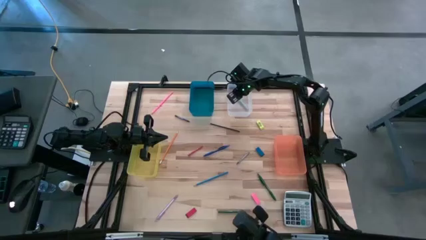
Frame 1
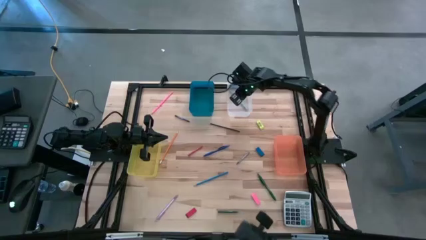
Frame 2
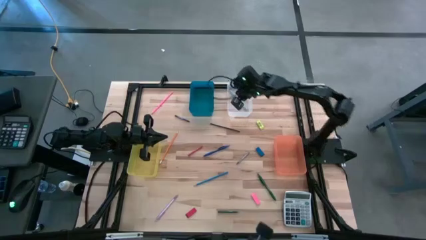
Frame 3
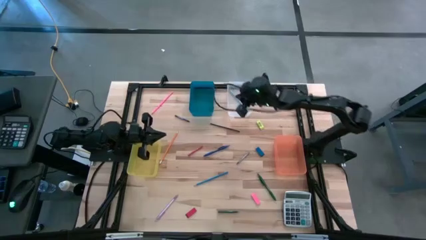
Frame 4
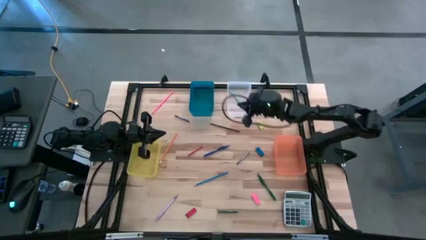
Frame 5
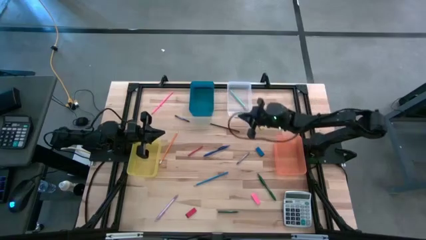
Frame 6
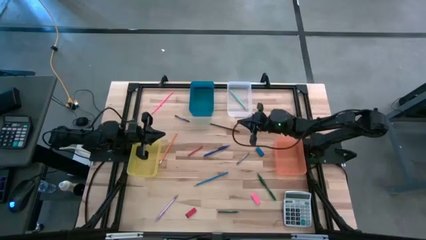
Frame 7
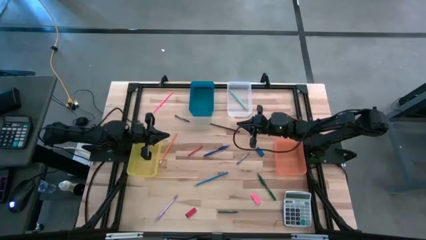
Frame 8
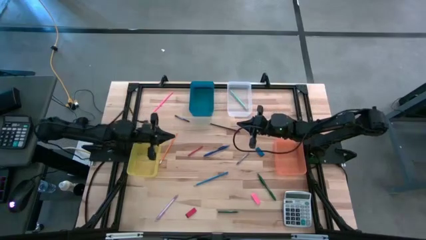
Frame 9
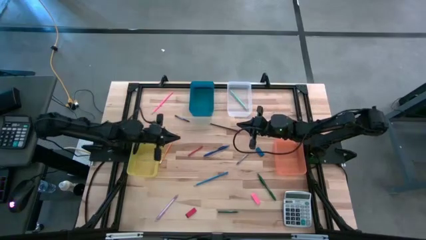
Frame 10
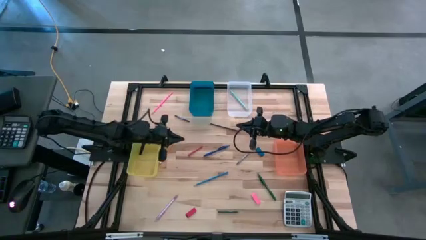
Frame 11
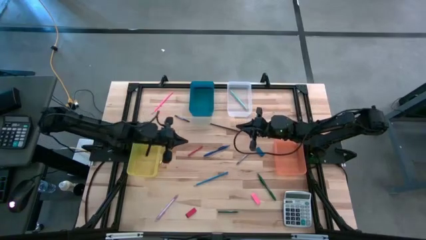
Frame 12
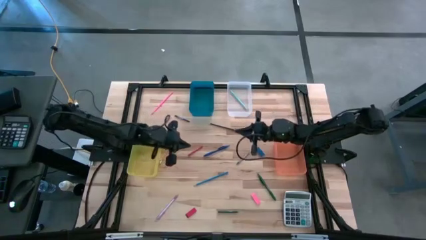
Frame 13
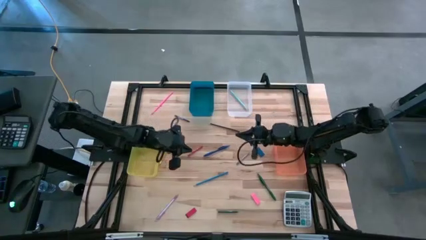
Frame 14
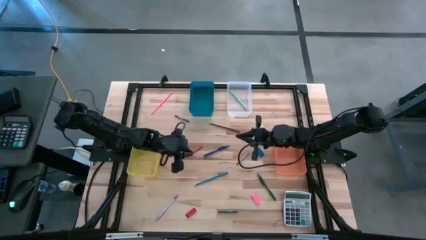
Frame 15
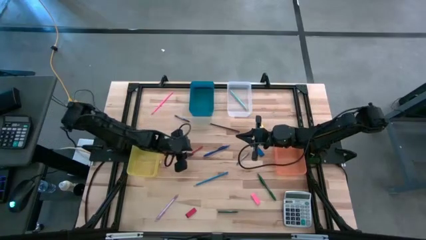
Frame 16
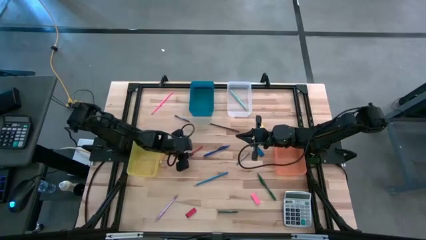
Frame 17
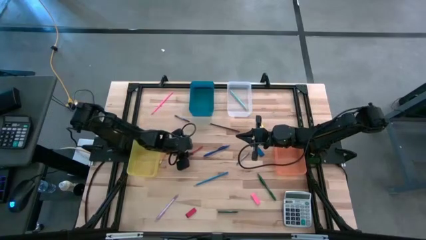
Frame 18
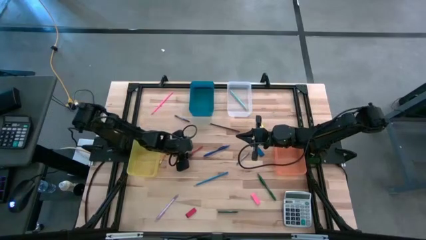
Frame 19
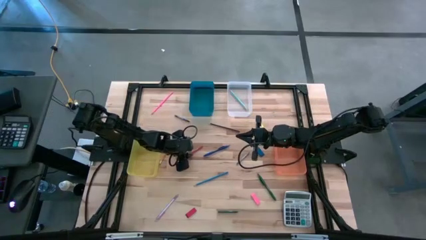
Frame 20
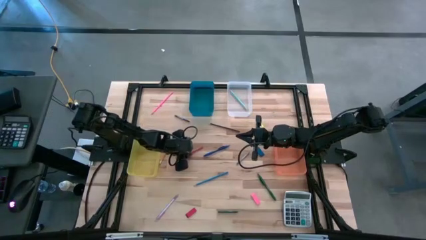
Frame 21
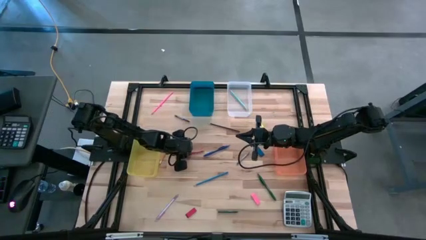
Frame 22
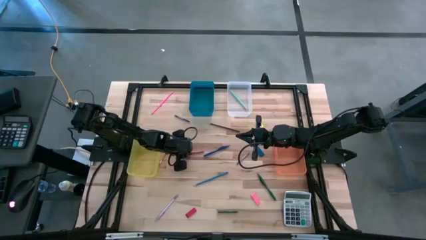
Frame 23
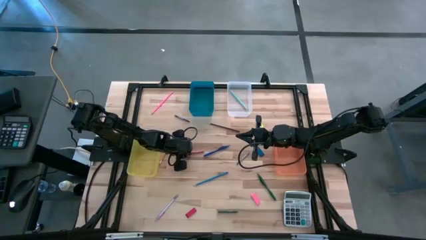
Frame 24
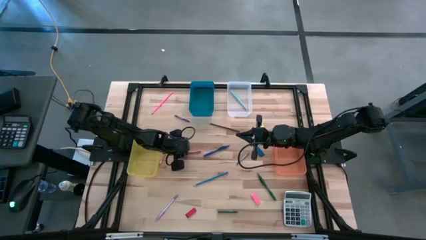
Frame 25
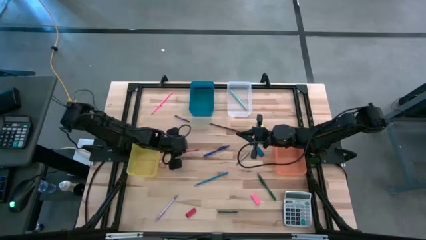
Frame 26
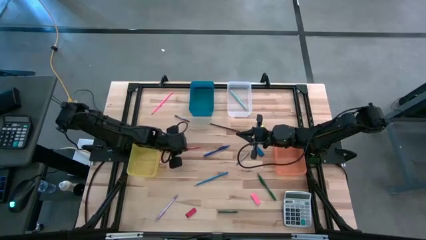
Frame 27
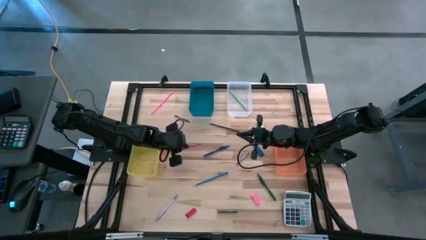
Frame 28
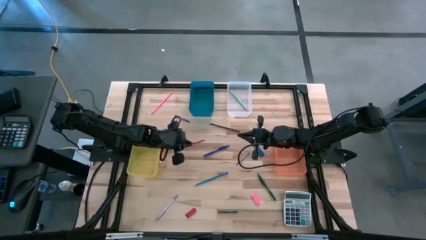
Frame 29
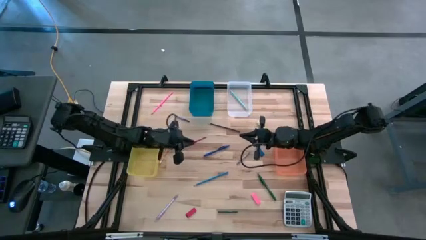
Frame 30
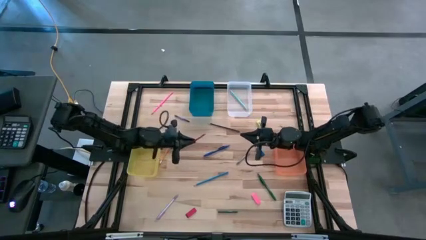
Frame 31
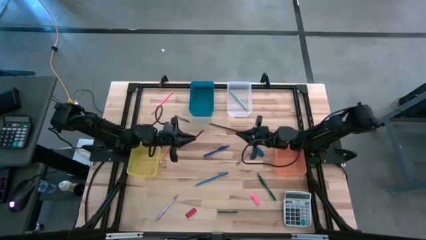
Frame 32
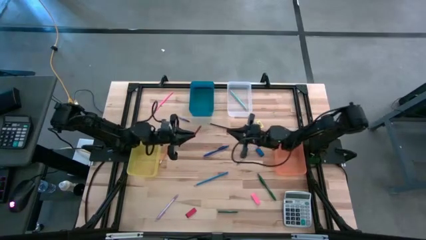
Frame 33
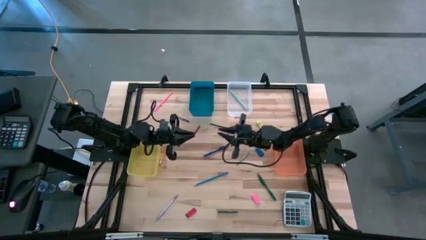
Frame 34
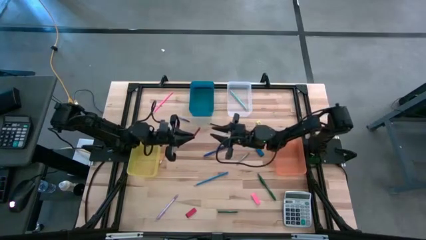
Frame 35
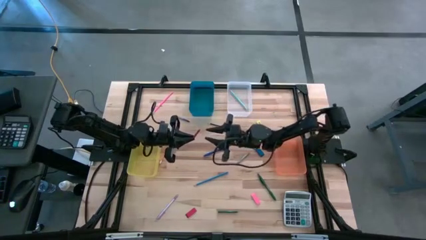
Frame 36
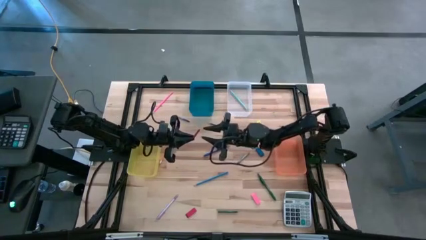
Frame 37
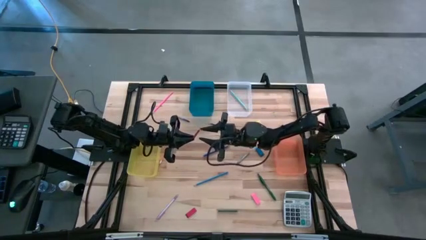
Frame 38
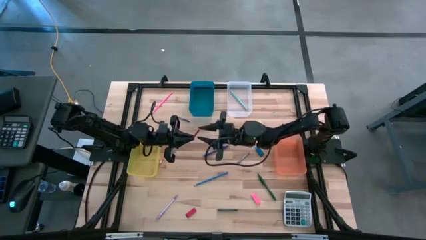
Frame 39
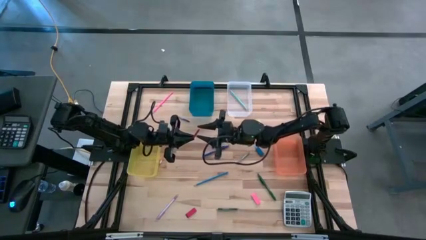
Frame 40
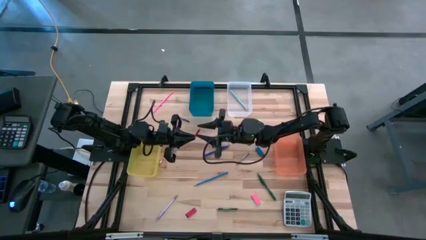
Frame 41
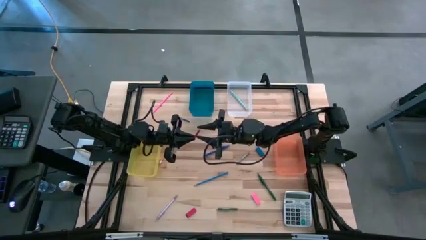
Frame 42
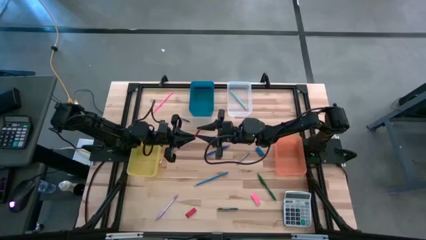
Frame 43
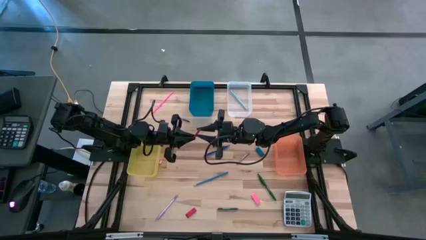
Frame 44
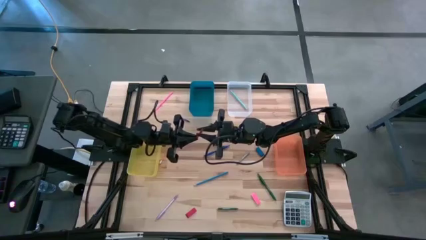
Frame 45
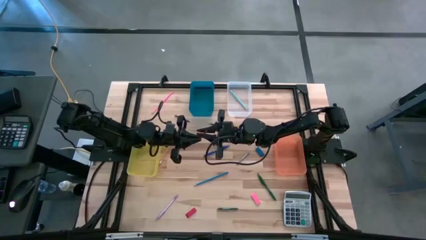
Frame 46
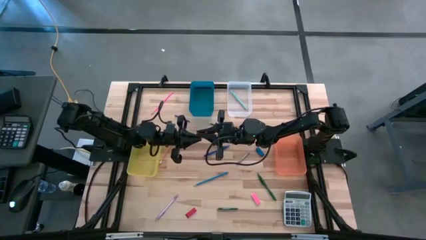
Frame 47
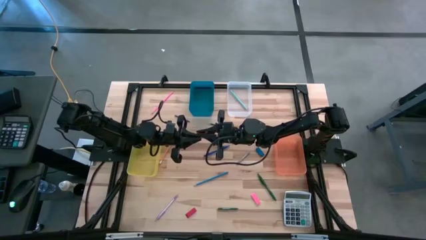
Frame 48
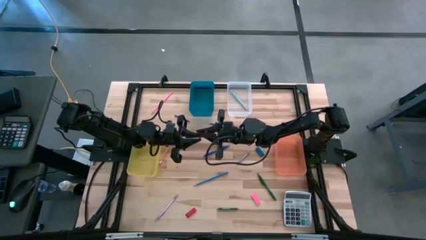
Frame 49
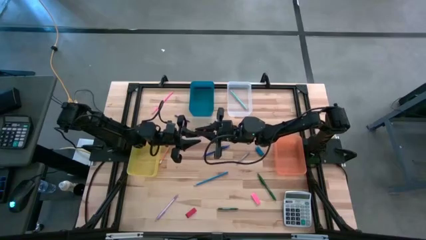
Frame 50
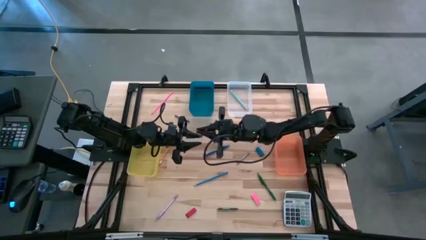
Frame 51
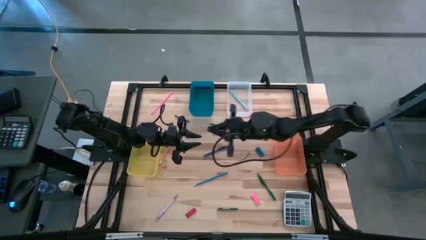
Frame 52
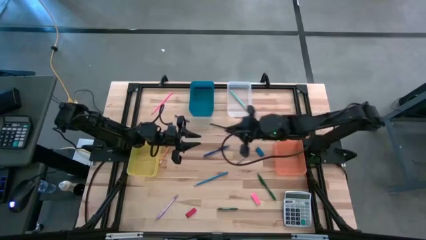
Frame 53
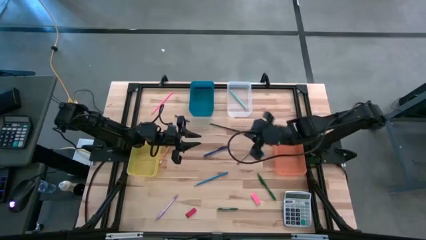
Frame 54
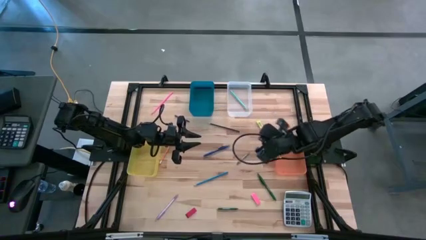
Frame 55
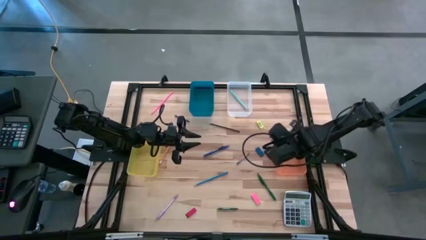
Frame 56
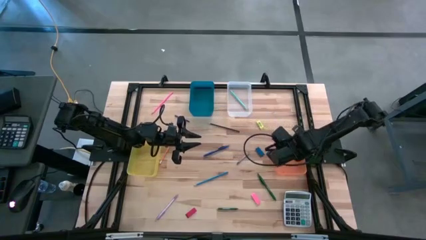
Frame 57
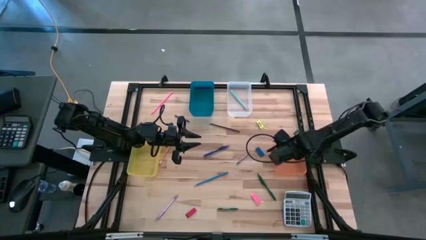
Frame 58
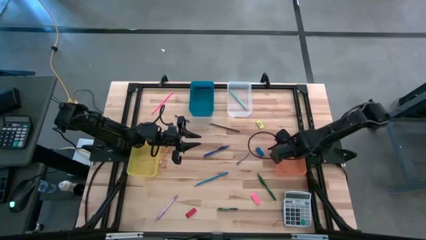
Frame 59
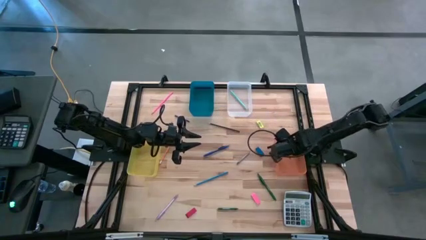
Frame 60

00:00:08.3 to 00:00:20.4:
Task: Sort crayons/erasers/pens/pencils in bins
Put the red crayon into the orange bin
